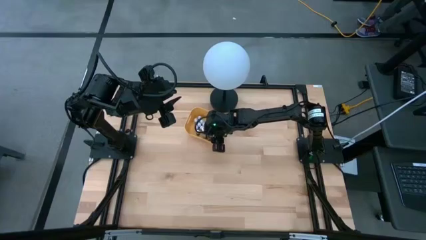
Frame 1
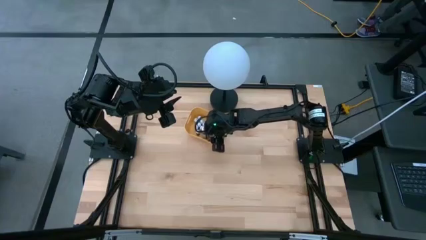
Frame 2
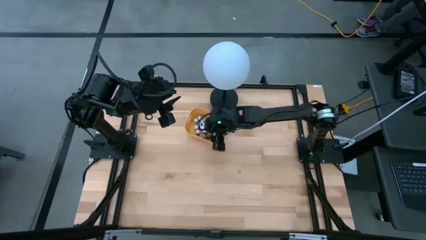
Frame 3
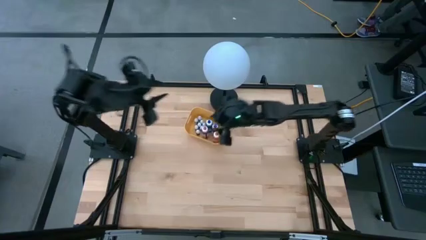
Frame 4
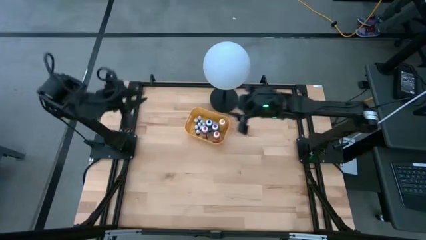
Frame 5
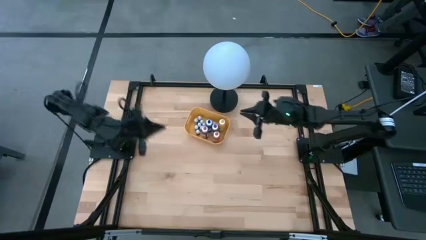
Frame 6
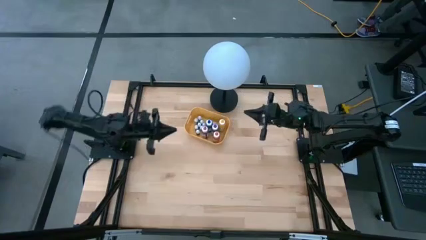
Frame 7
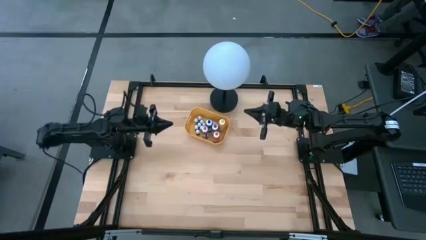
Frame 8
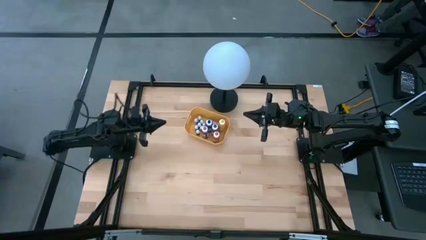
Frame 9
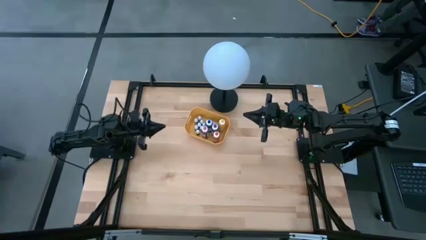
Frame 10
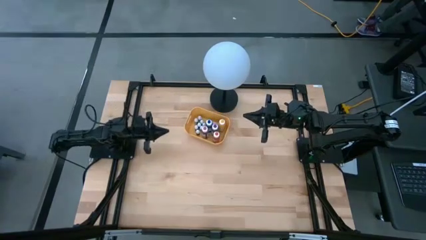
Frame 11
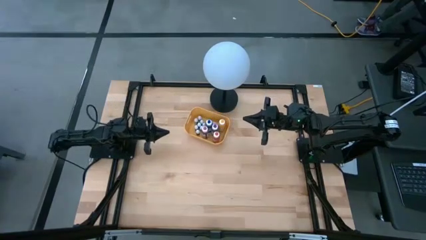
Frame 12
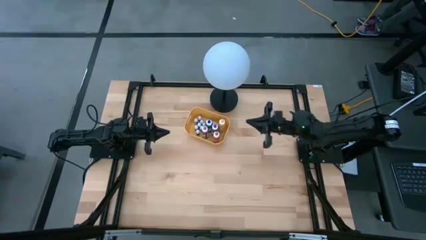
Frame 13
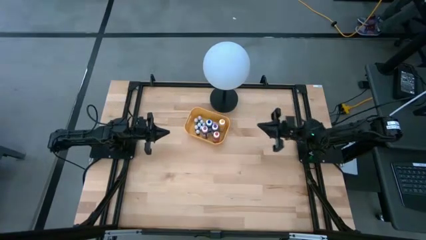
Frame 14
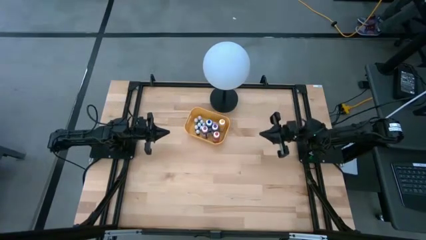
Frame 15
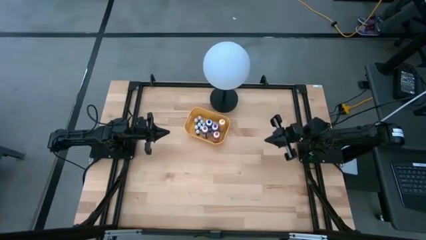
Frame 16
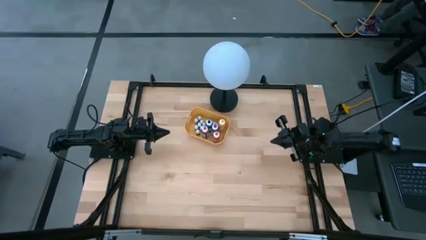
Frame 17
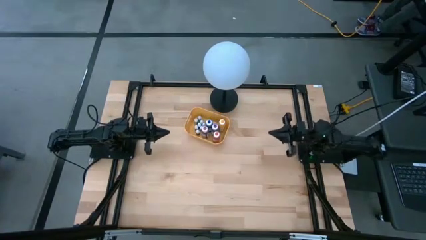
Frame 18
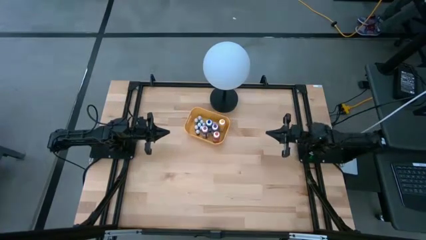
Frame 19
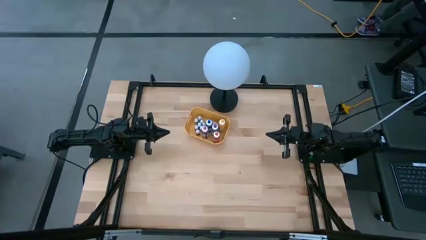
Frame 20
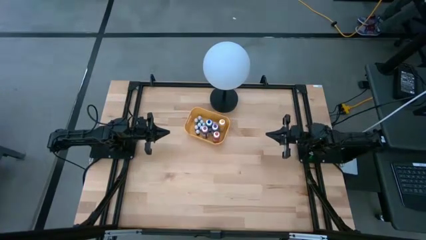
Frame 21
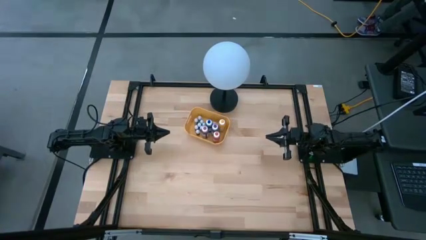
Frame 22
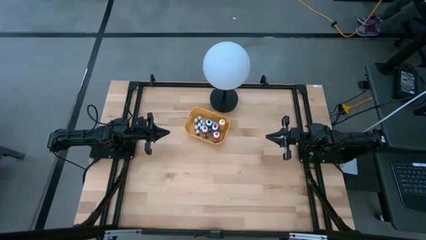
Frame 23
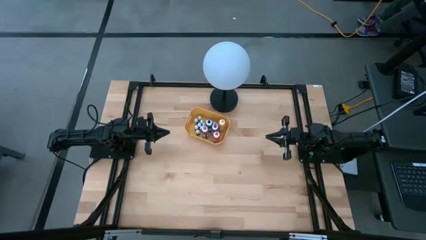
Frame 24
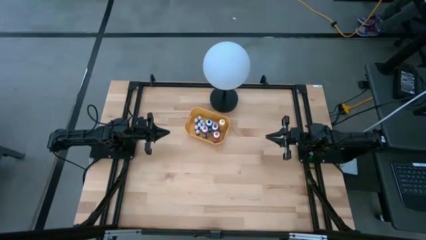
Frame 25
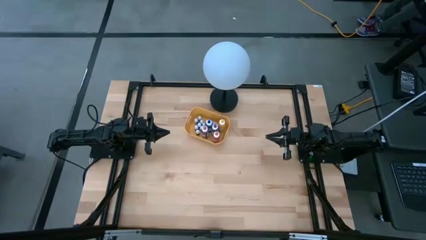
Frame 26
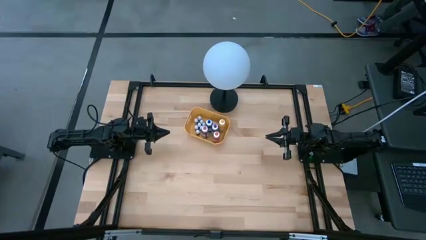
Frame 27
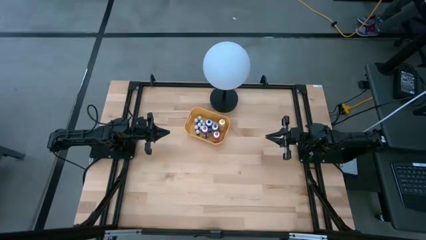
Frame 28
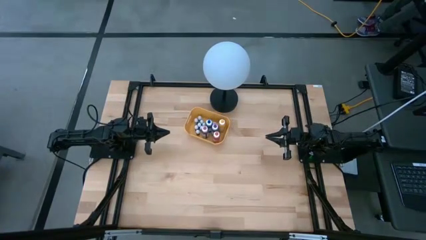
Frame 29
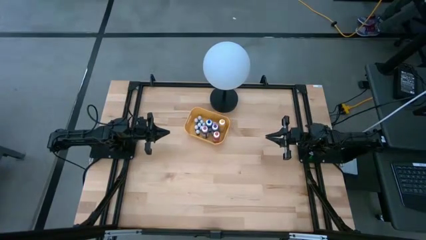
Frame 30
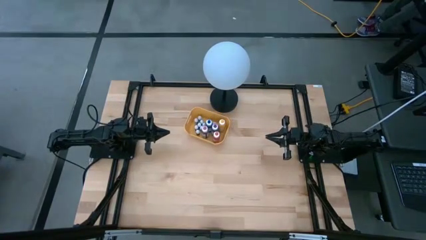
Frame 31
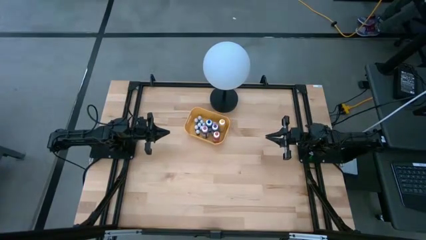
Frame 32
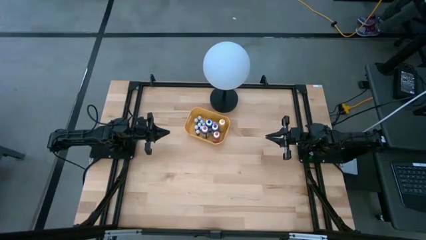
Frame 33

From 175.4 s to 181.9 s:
Task: Pick & Place food coloring
Return to Home Position

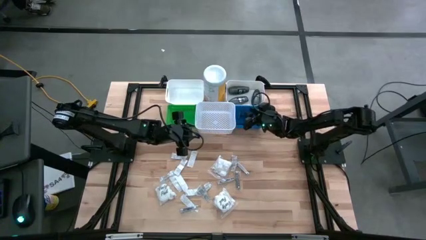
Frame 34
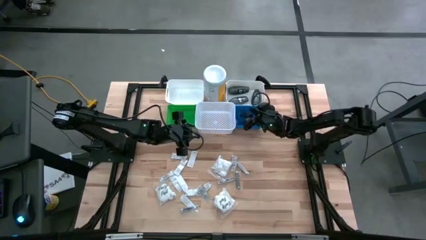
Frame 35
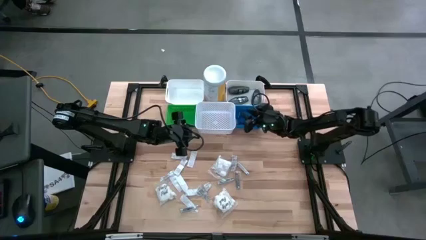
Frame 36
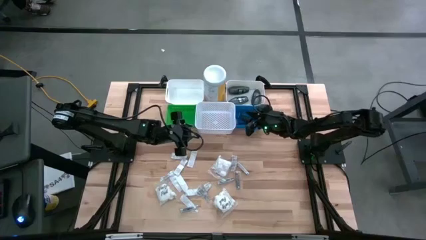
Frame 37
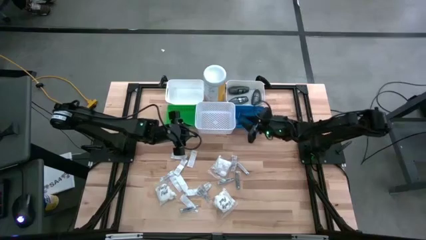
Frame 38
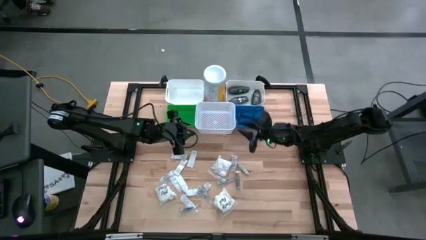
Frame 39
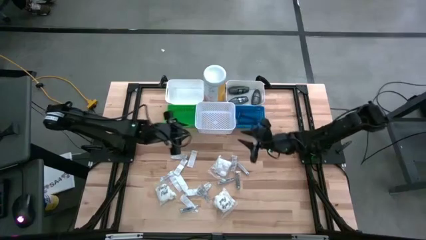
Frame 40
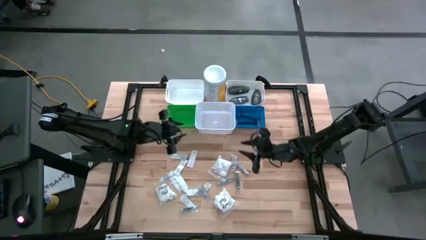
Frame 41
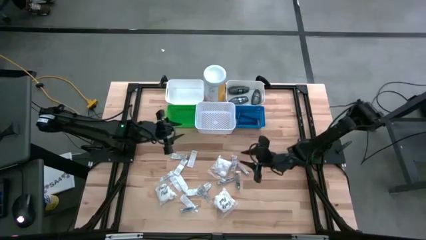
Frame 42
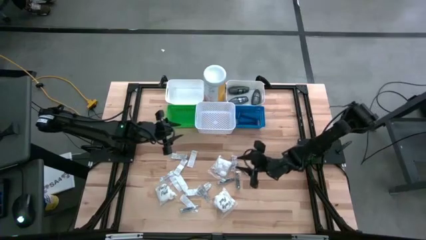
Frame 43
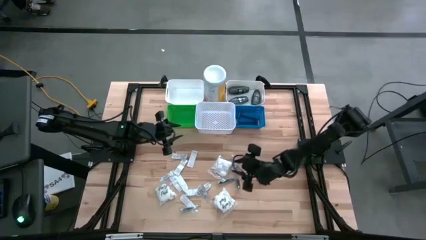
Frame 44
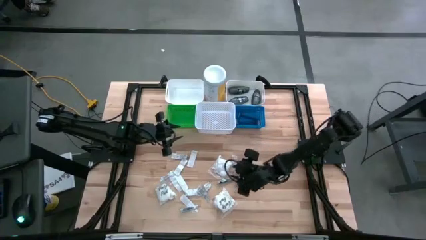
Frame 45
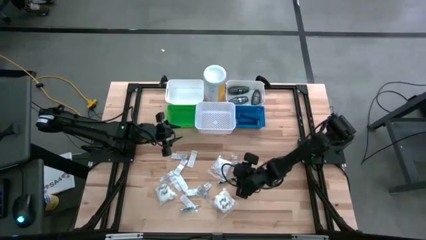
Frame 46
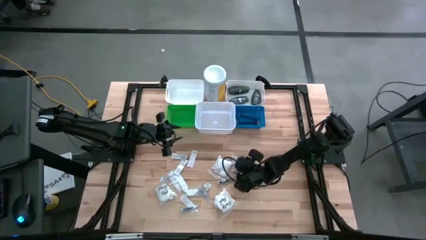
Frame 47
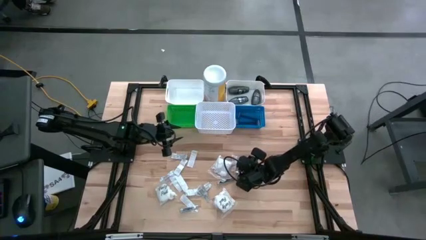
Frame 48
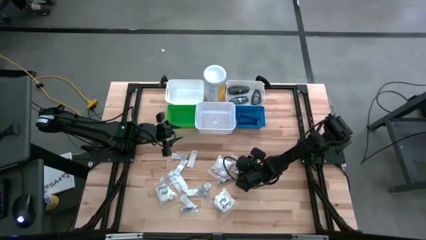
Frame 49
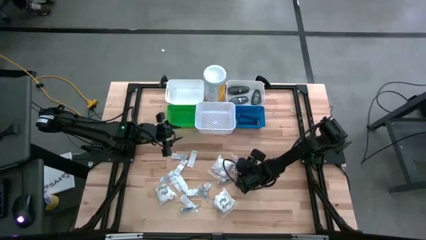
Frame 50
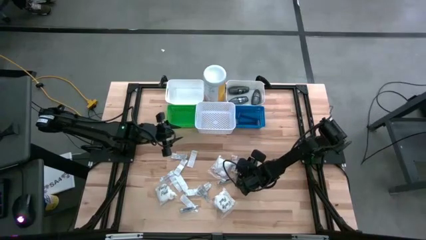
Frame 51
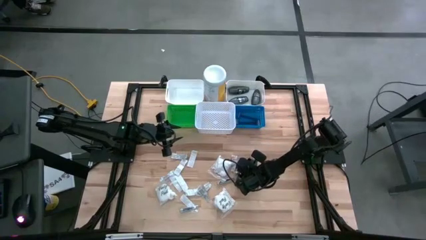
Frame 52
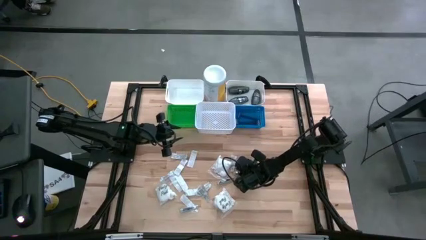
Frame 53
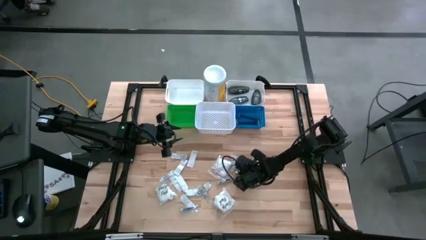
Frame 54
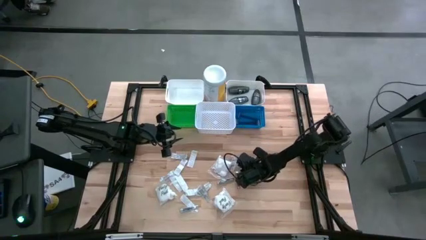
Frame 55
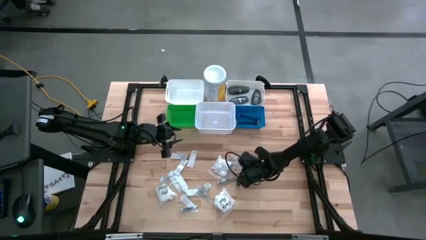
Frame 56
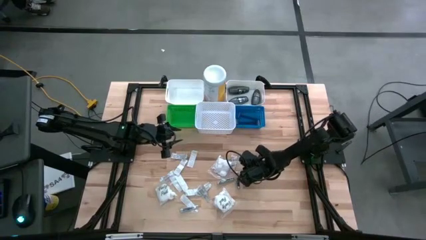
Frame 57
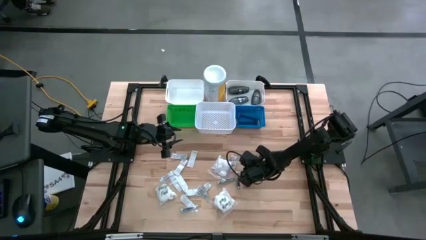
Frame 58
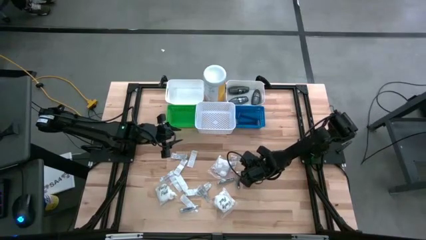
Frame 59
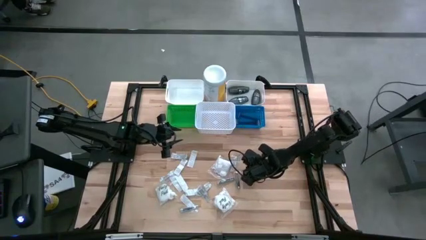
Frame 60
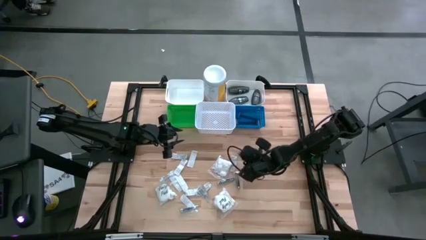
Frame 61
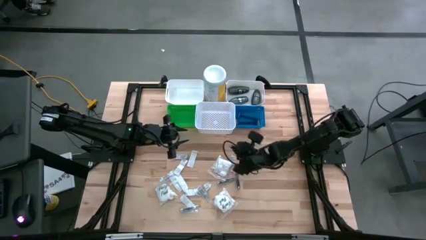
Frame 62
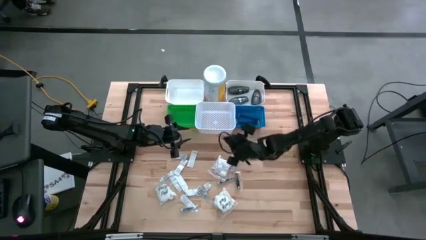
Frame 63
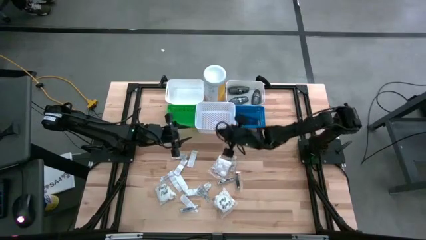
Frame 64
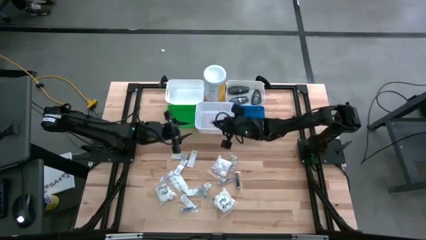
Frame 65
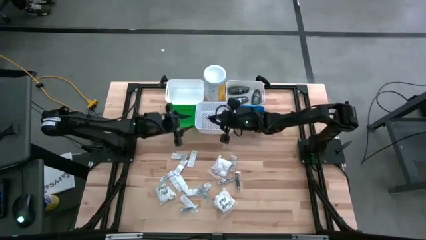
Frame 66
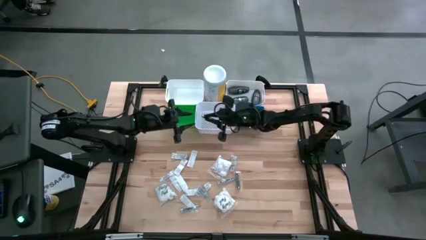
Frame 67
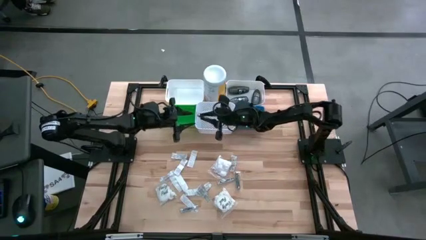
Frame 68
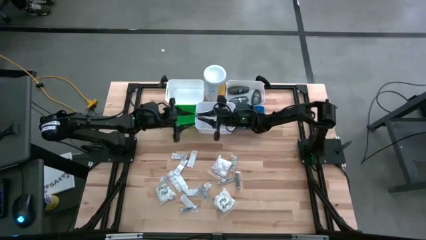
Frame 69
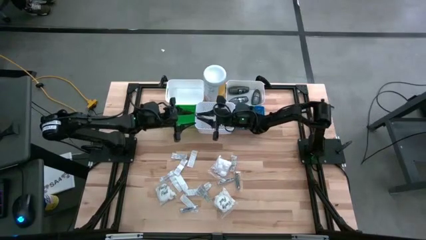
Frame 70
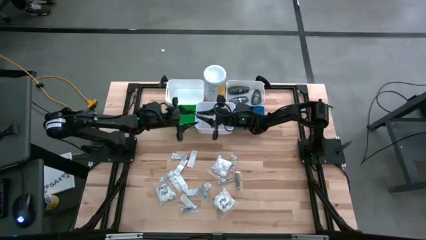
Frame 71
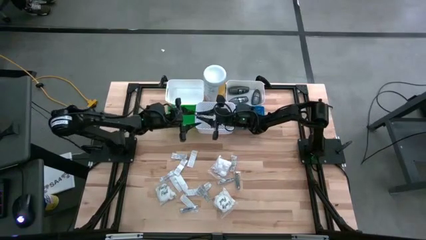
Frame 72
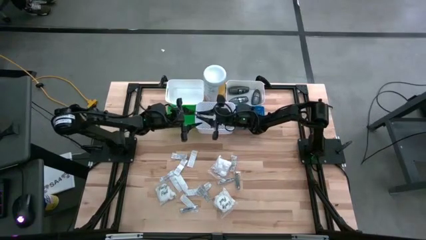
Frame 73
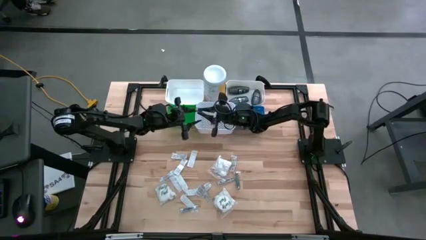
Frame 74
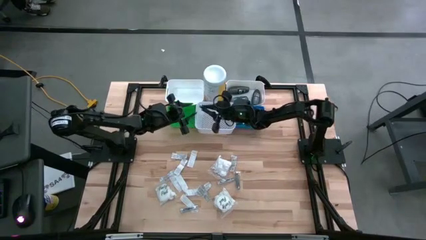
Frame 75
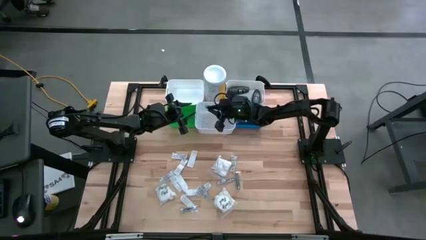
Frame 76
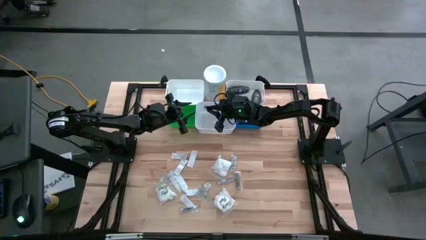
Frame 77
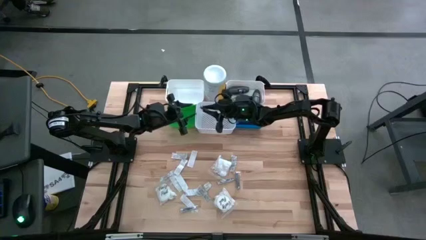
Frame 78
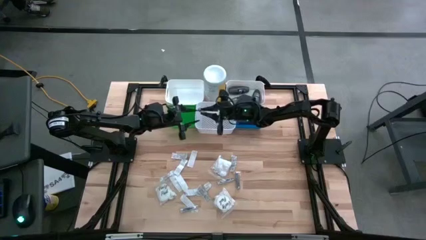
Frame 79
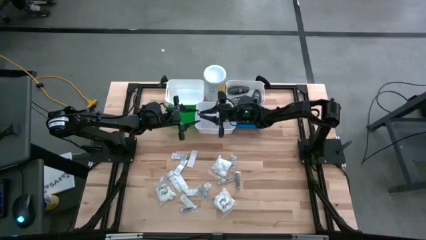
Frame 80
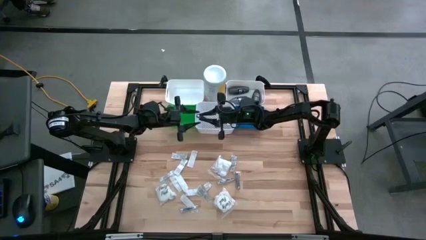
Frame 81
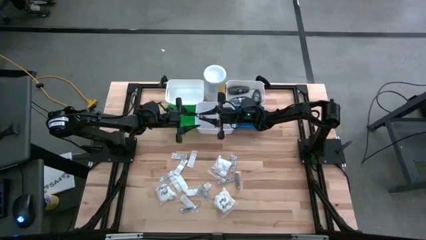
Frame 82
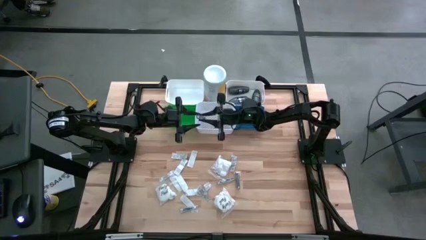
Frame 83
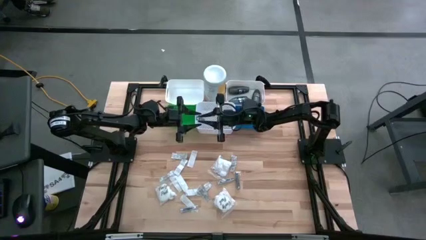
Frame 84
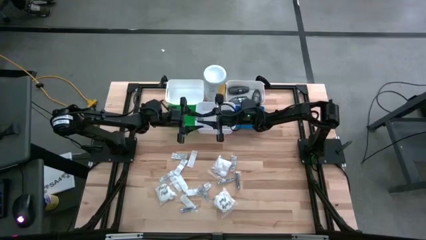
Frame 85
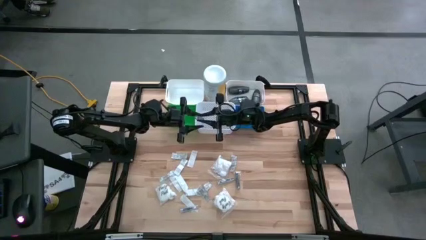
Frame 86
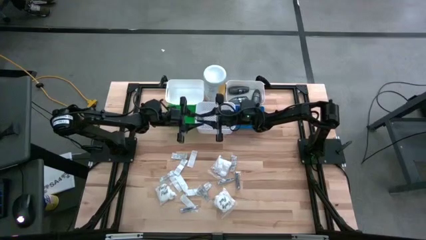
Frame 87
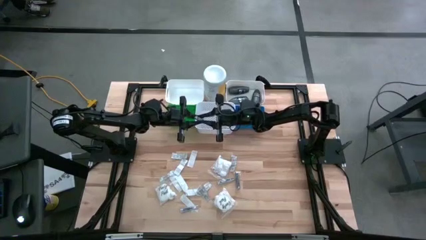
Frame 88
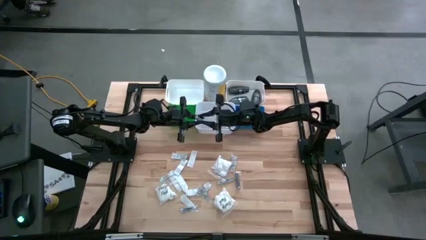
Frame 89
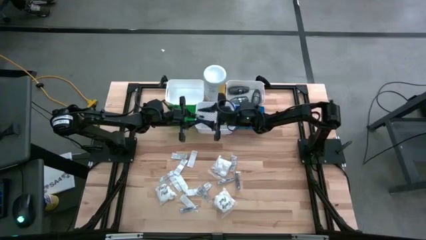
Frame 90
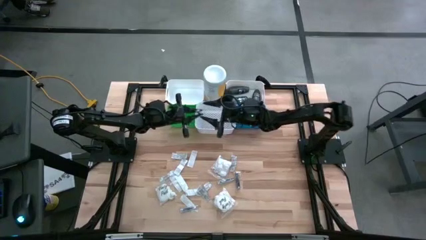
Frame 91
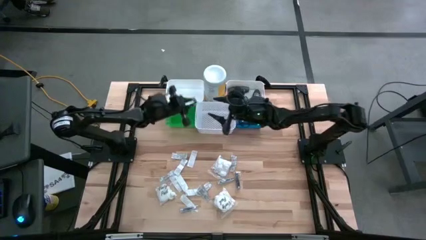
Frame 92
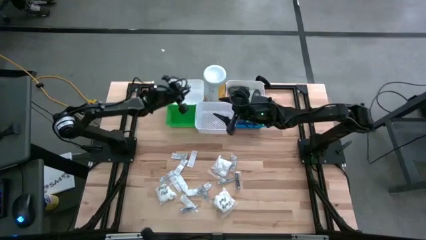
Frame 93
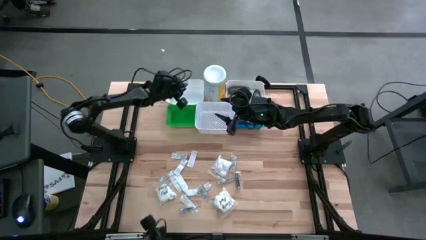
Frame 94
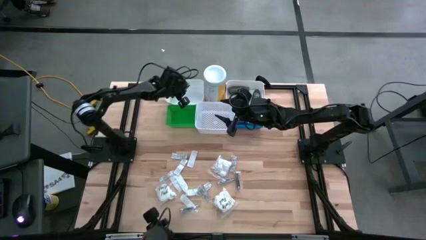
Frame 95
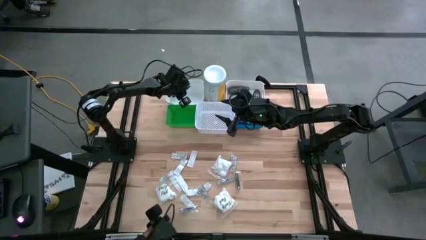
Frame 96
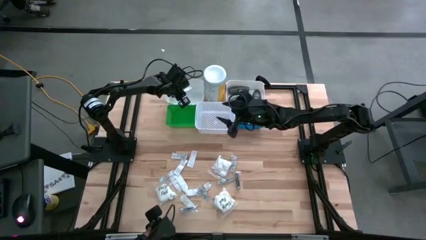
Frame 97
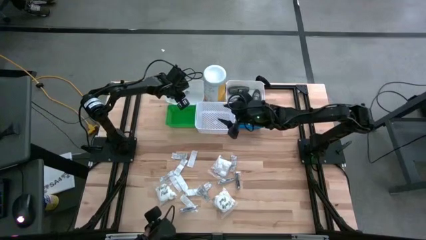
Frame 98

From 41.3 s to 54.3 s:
Task: Pick & Place Travel size toiletries
Put the silver nail cutter into the top left white bin
